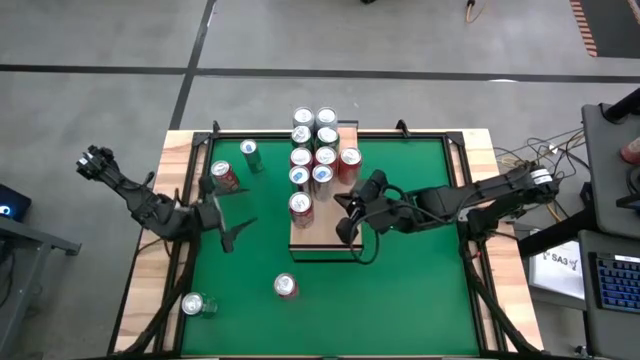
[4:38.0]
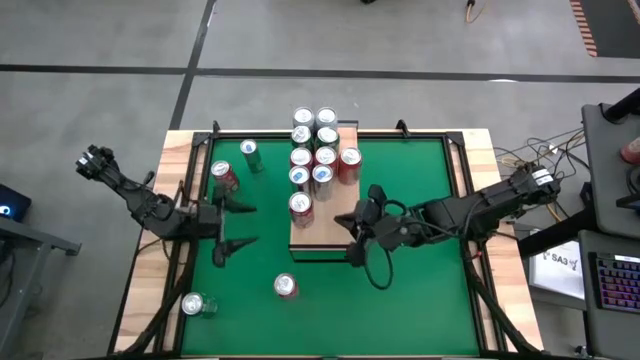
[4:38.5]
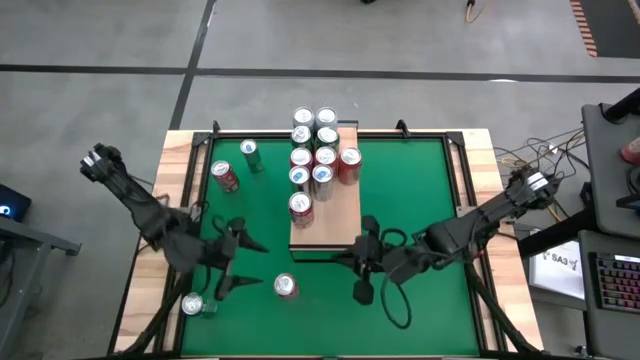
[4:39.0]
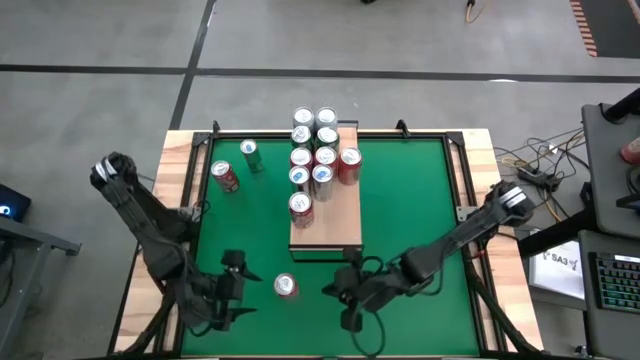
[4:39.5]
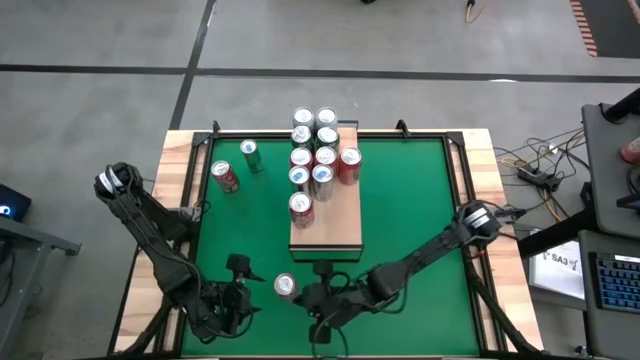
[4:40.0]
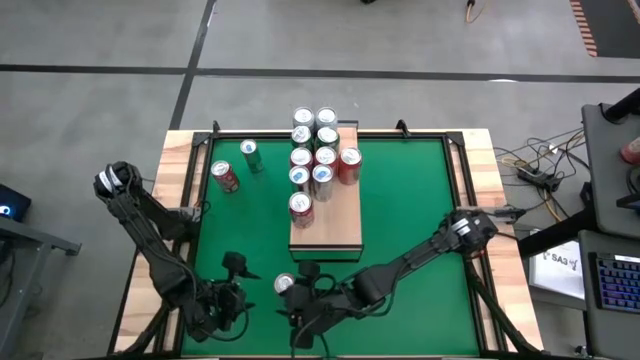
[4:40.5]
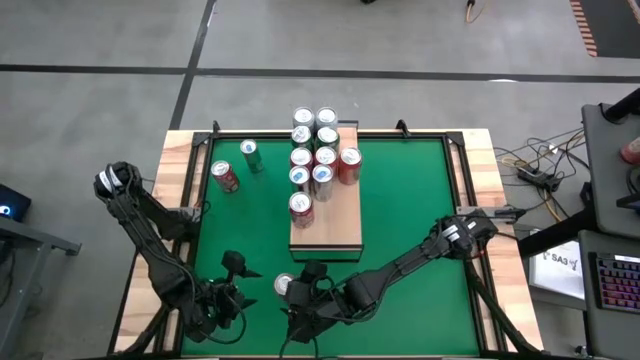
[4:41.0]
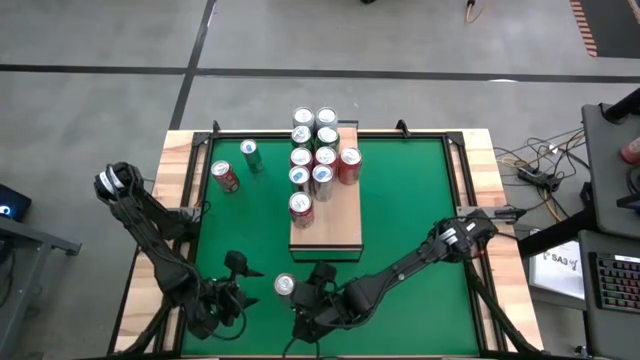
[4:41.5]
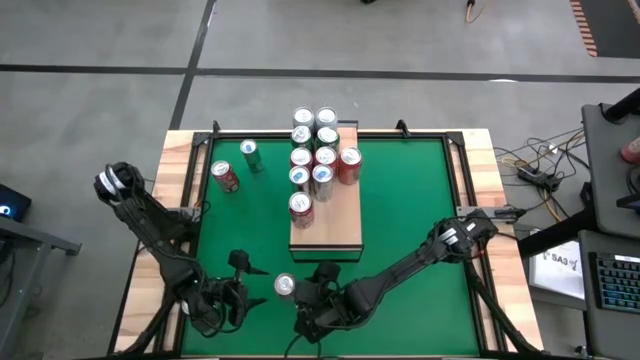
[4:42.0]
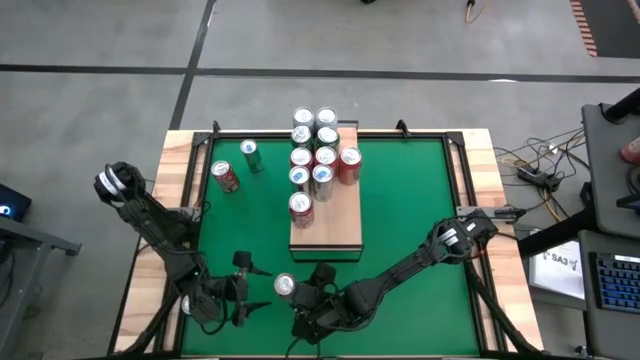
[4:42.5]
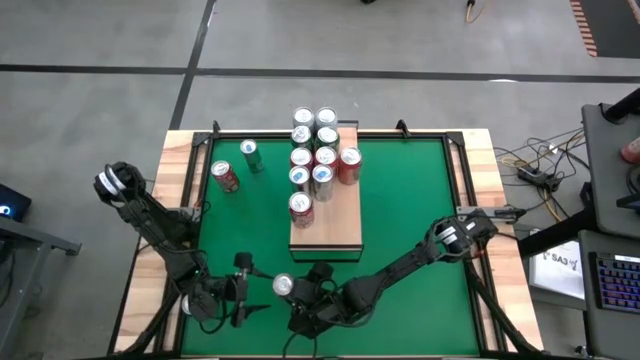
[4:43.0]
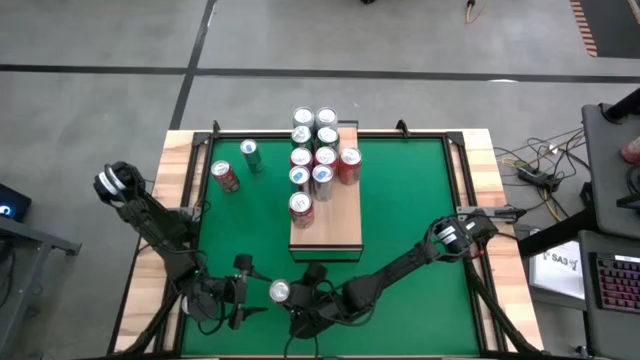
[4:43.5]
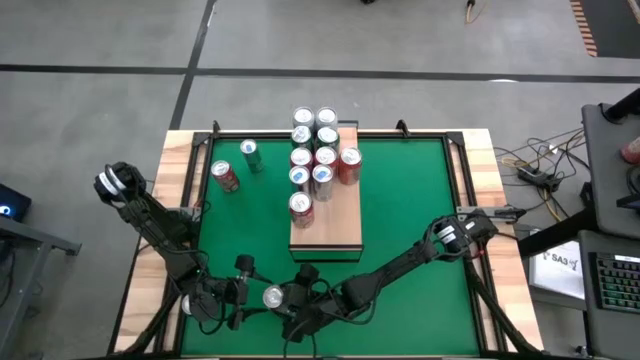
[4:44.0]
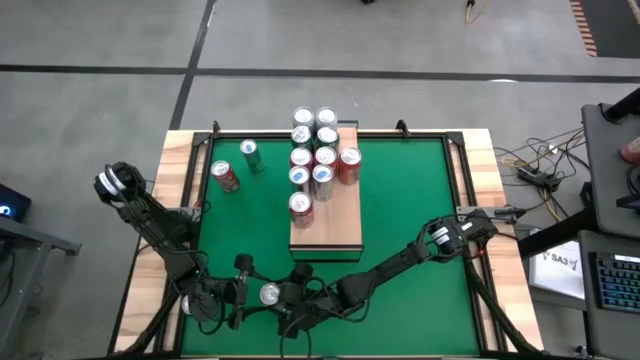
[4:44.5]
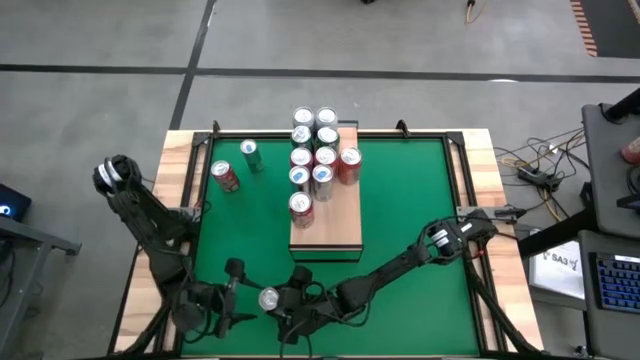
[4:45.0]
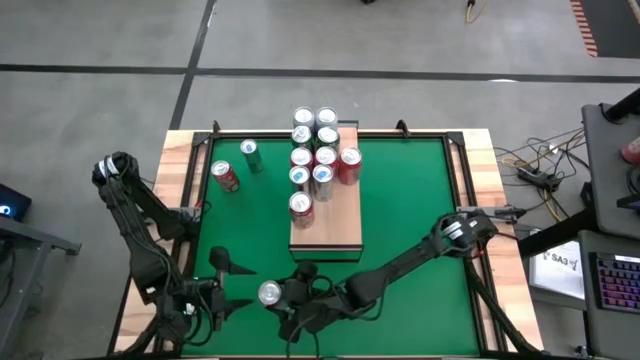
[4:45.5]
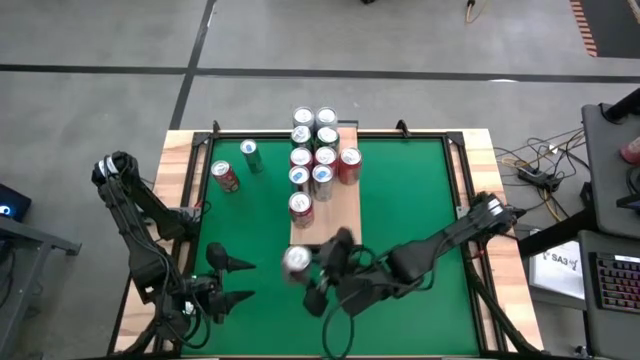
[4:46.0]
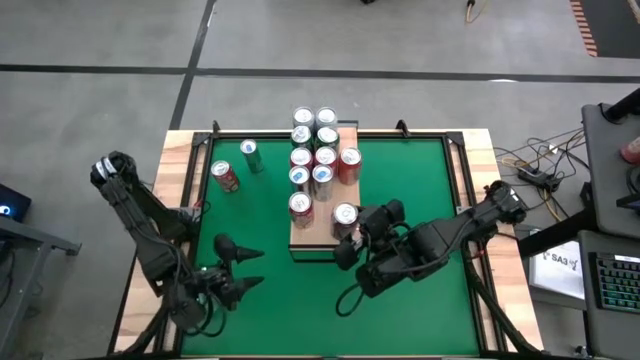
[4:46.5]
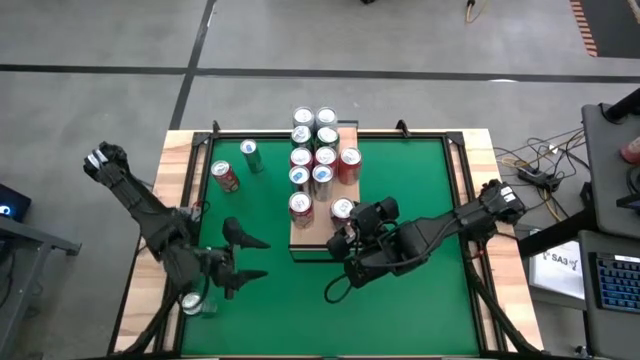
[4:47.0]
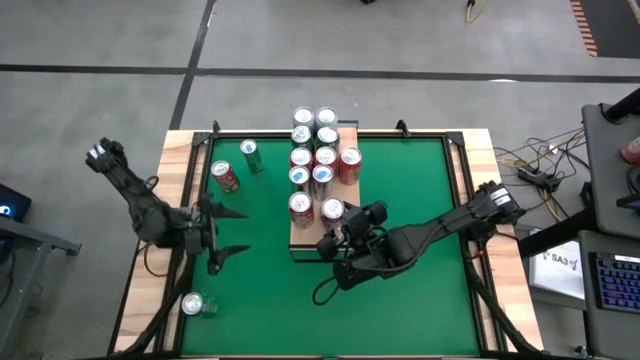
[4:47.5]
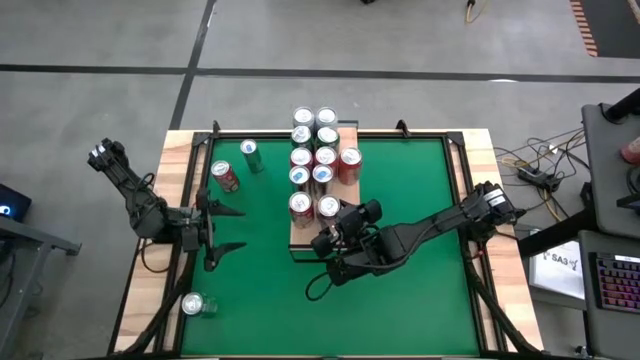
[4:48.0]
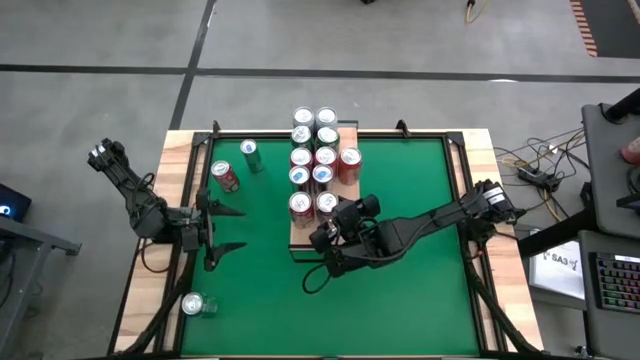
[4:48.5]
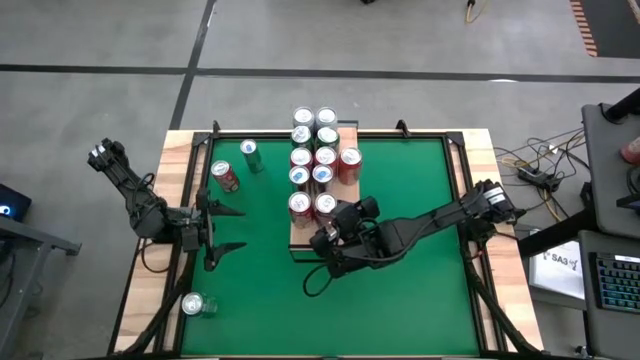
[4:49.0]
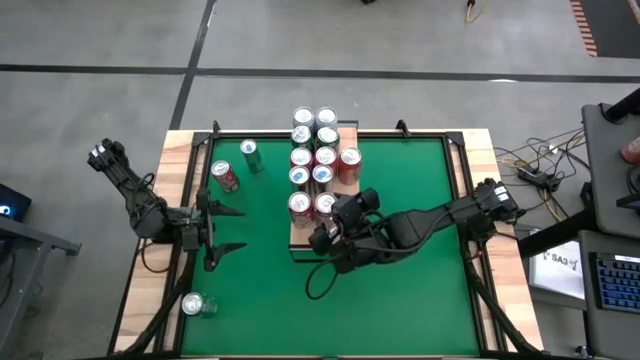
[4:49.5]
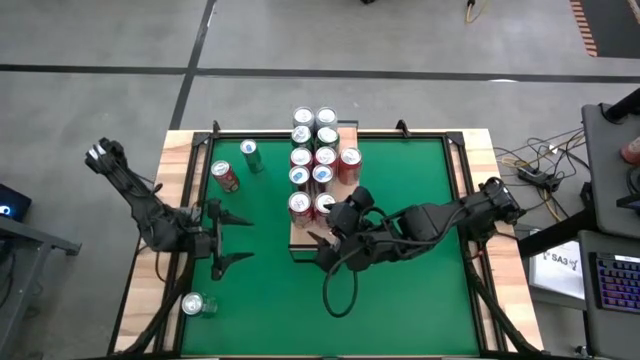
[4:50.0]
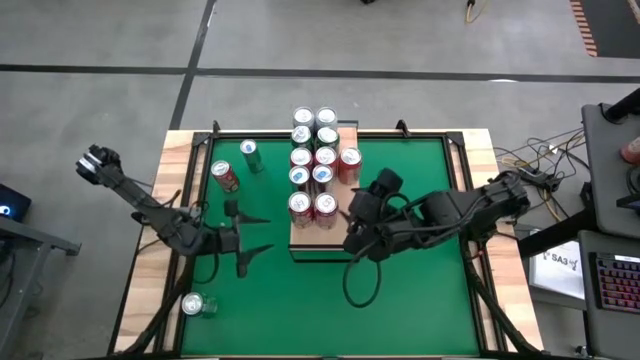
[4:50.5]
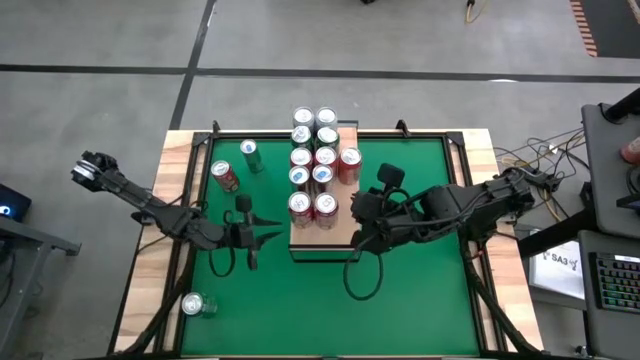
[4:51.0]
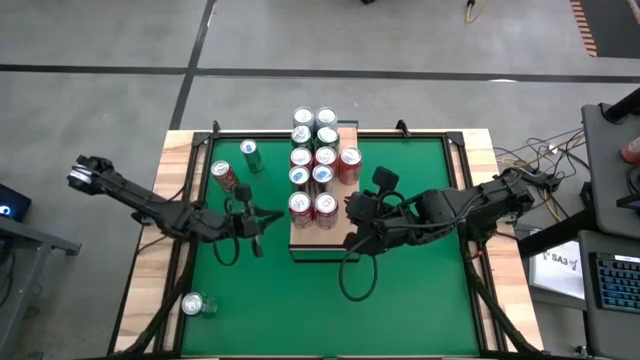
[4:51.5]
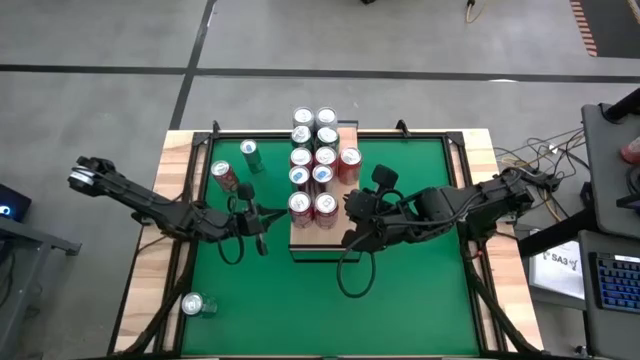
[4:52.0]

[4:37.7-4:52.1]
Task: Place canned beverage on shelf
Put the red can on the shelf

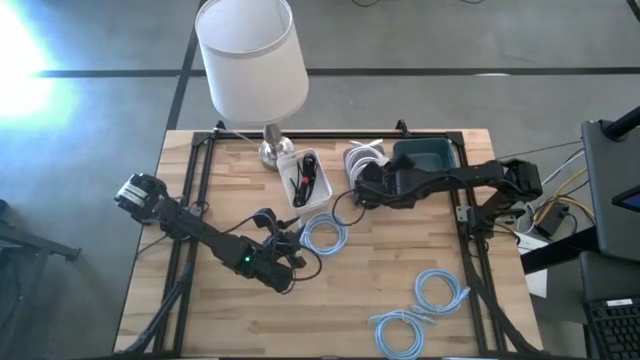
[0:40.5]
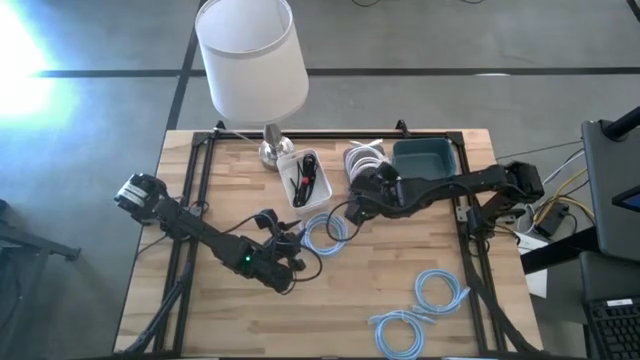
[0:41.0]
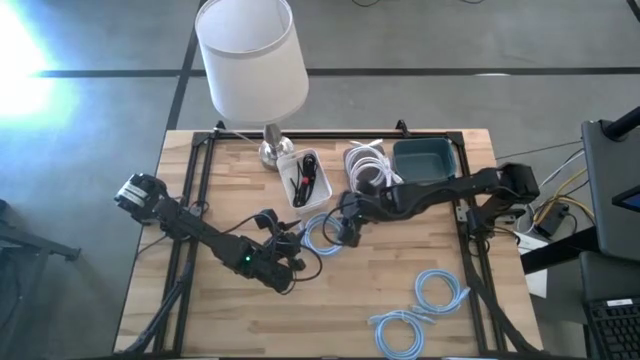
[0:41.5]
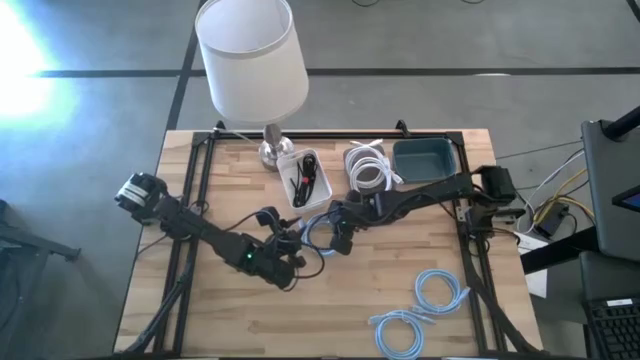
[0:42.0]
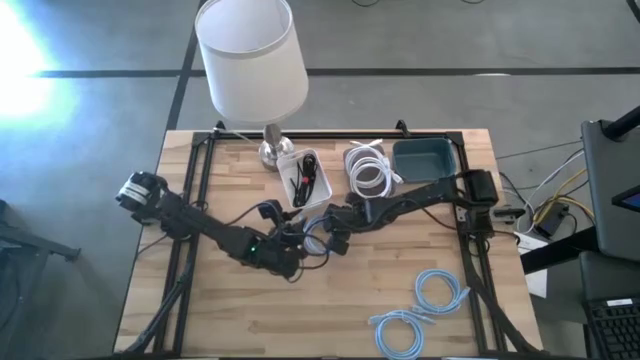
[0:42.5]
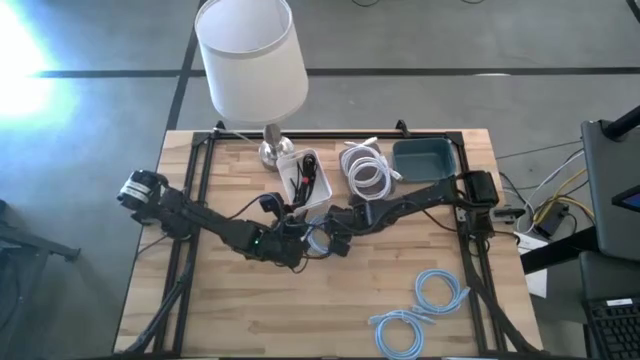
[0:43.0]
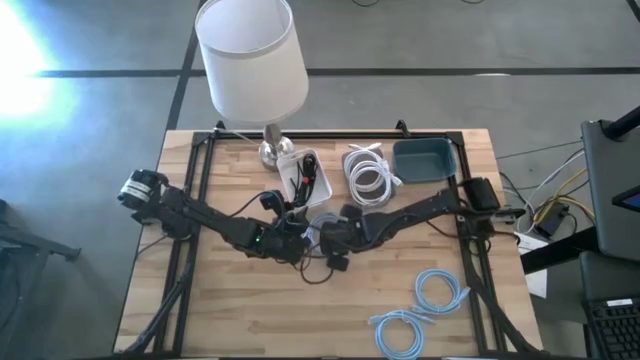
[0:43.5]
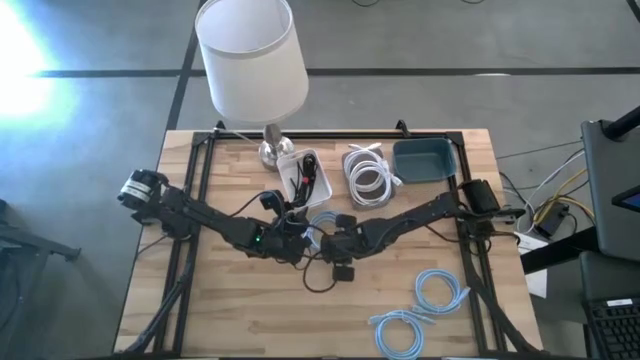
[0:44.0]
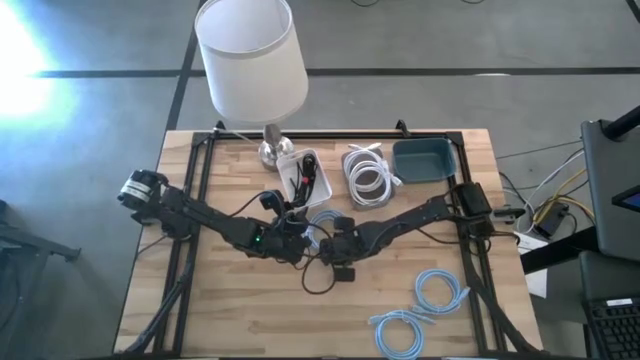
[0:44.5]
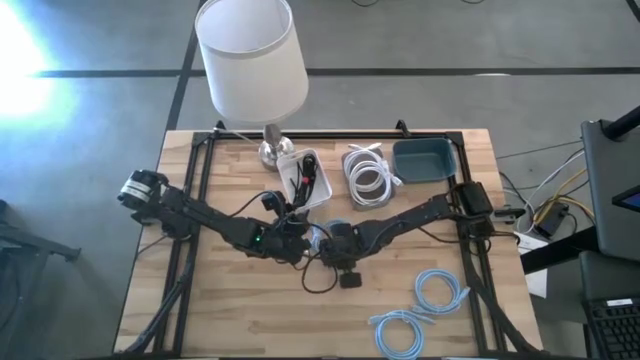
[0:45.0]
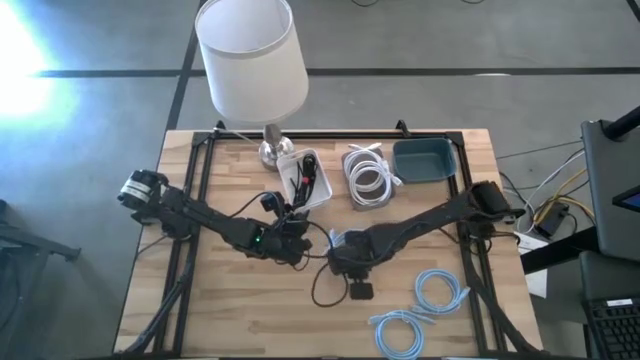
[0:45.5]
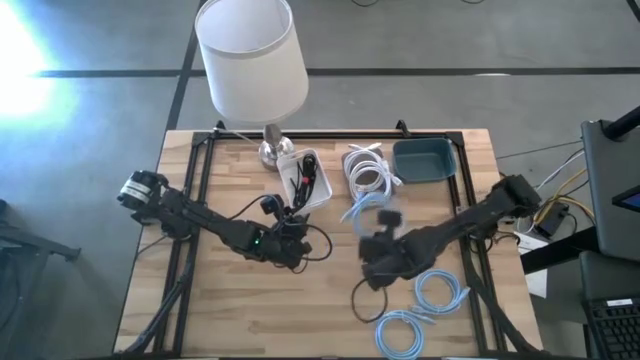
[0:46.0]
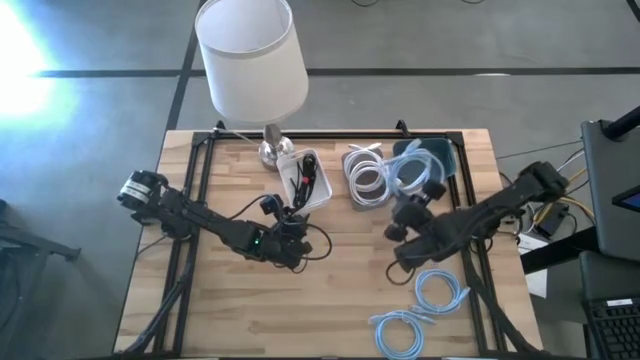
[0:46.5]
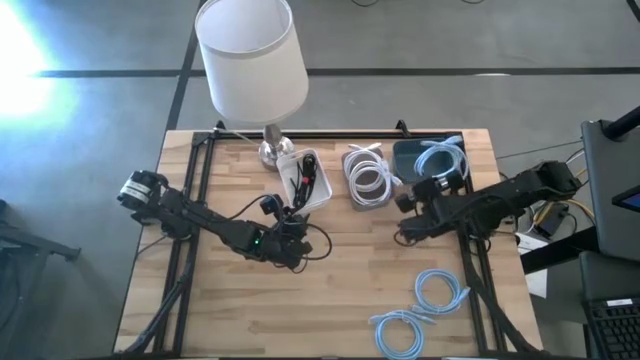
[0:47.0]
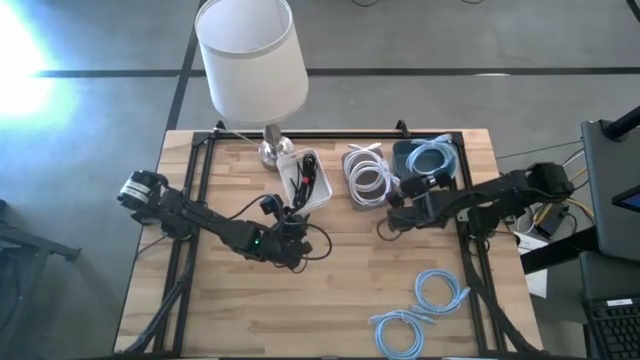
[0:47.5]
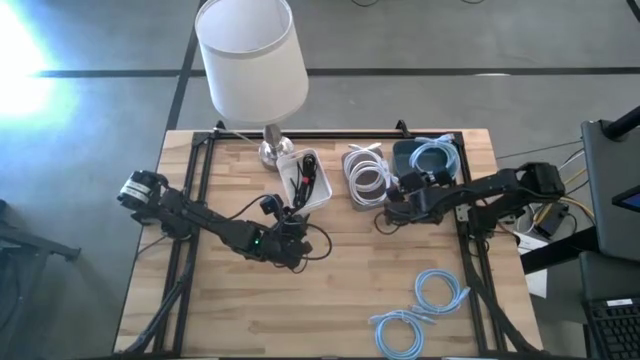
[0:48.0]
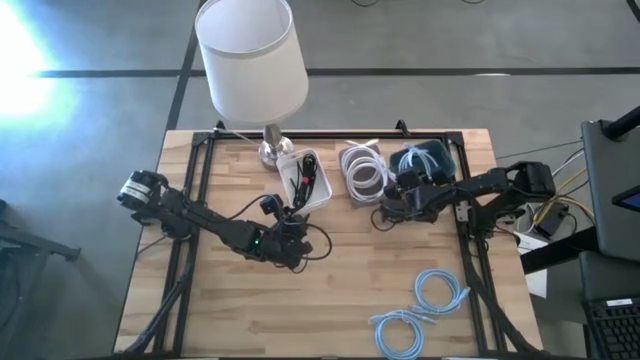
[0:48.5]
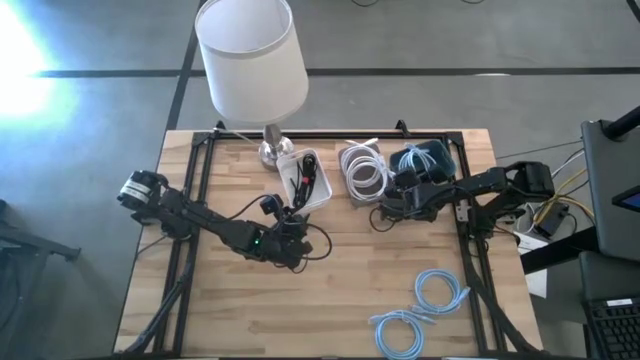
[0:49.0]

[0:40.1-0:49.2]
Task: Pick & Place USB Port
Put the top left blue HDMI cable into the green bin
